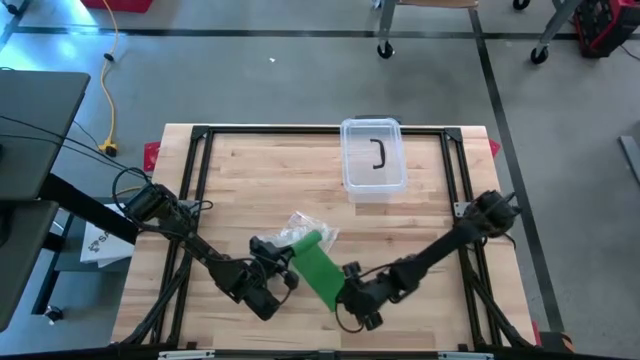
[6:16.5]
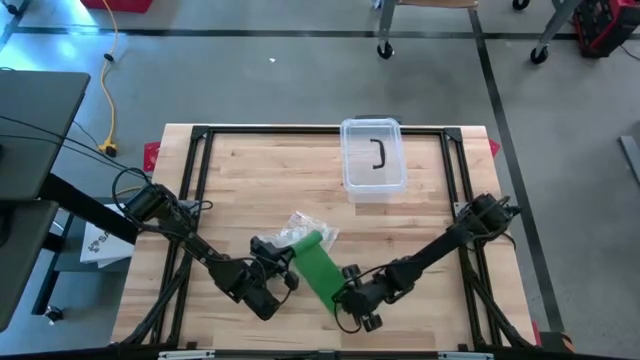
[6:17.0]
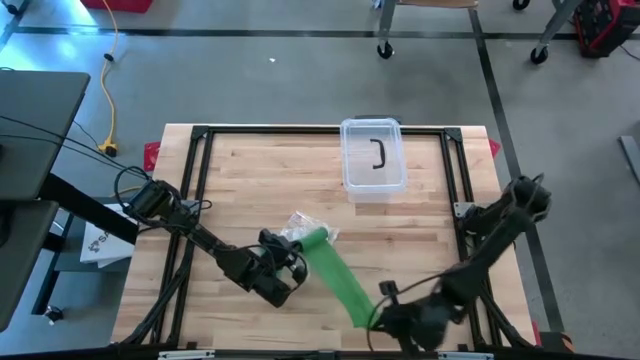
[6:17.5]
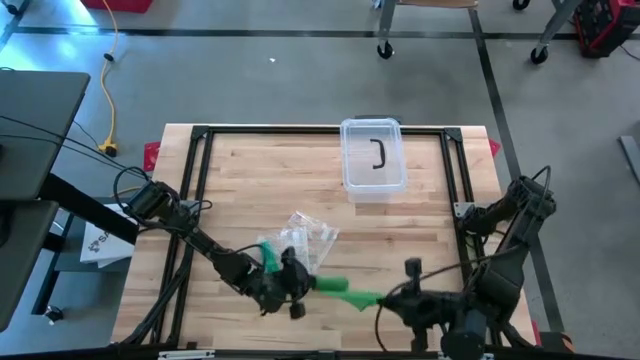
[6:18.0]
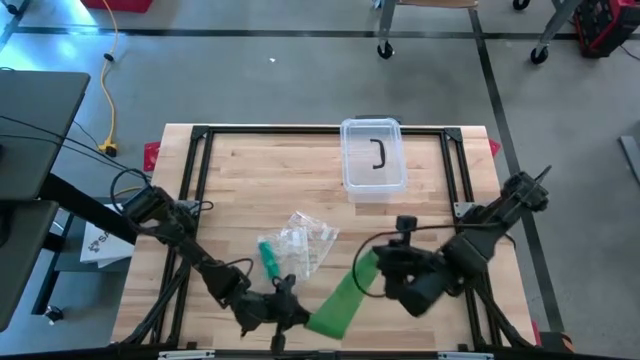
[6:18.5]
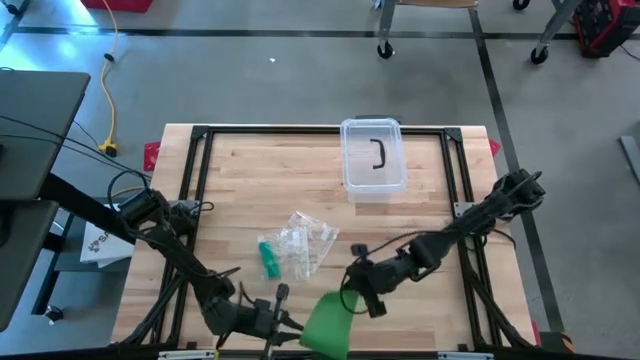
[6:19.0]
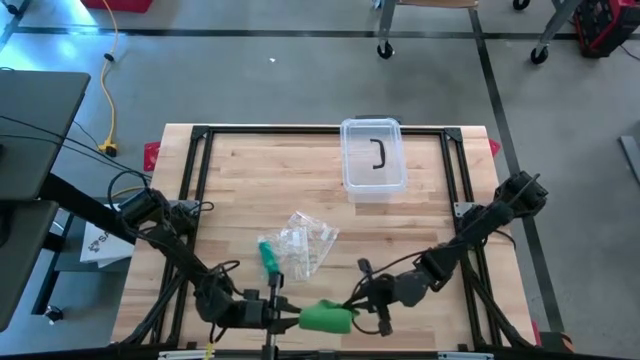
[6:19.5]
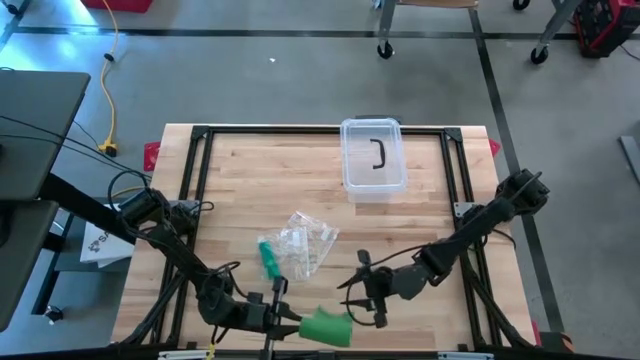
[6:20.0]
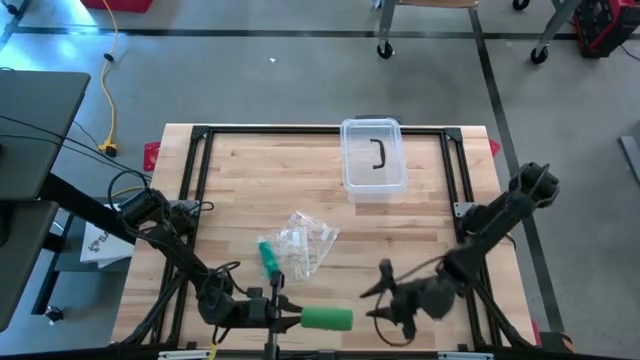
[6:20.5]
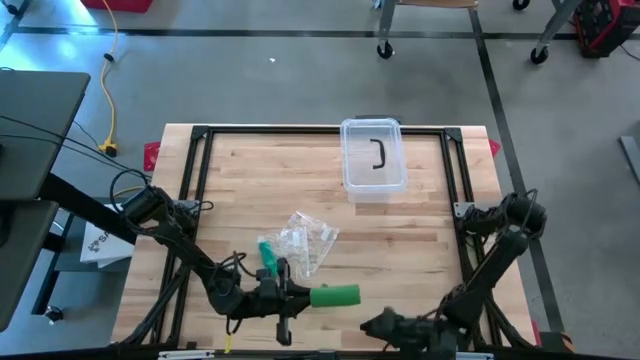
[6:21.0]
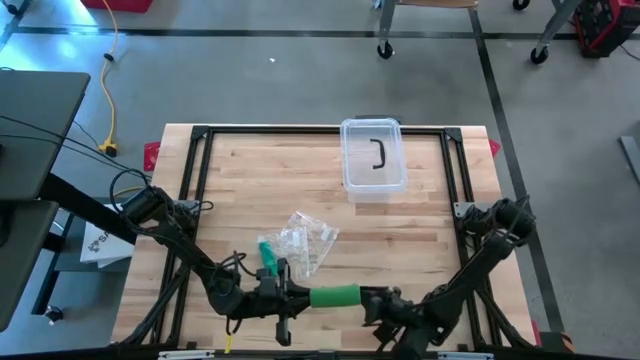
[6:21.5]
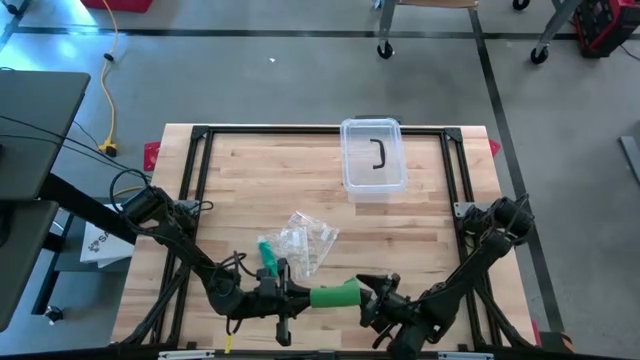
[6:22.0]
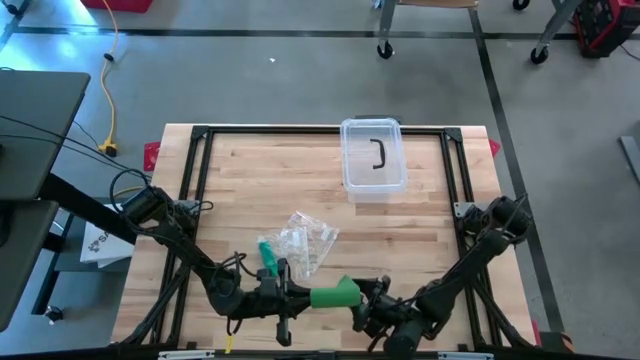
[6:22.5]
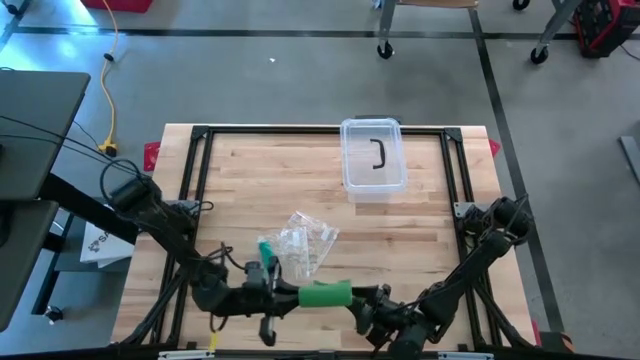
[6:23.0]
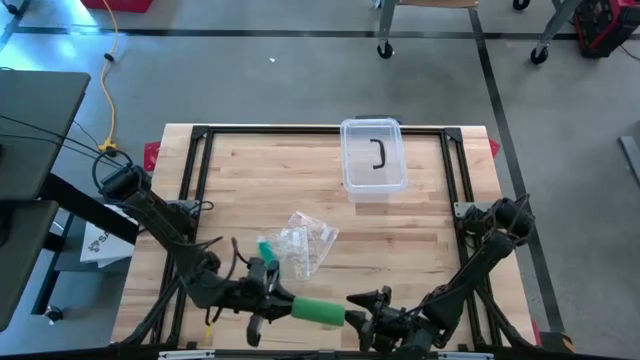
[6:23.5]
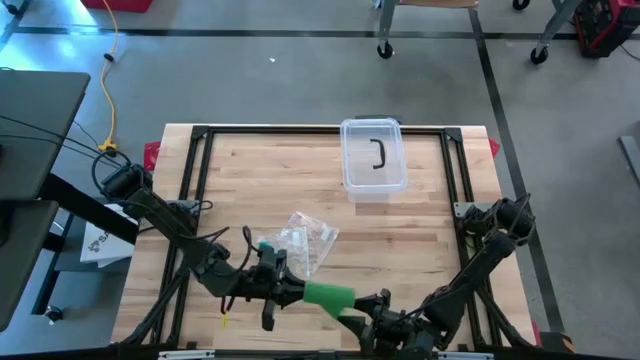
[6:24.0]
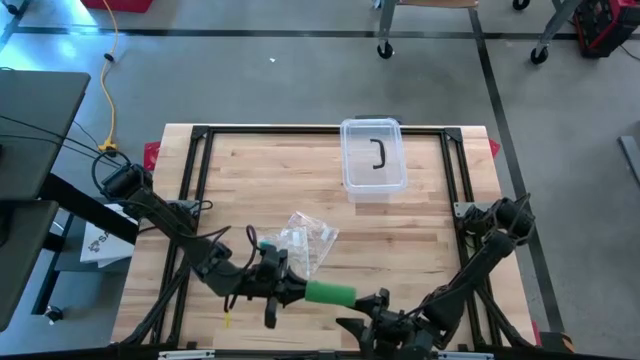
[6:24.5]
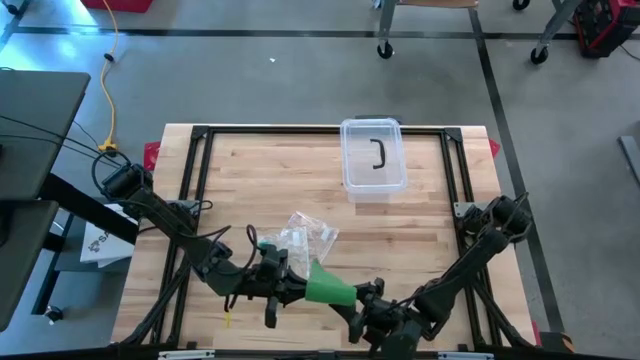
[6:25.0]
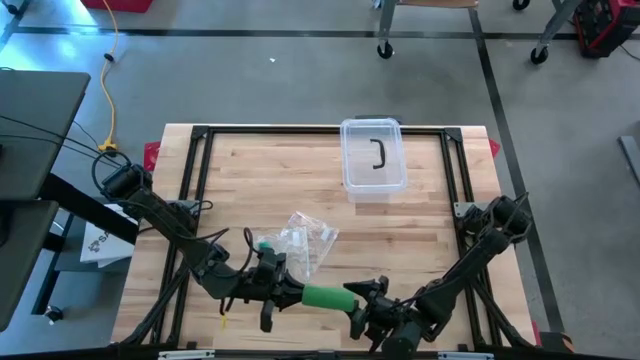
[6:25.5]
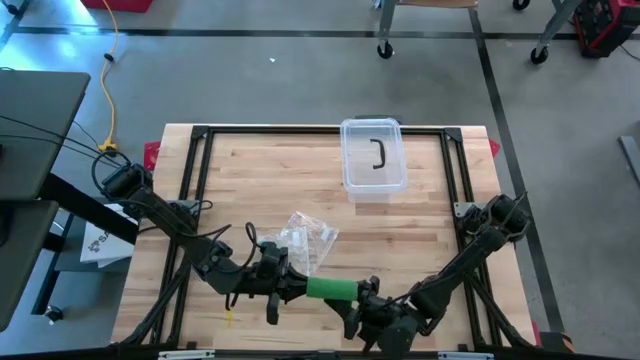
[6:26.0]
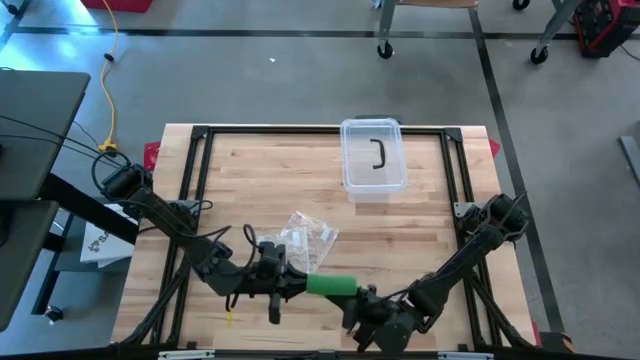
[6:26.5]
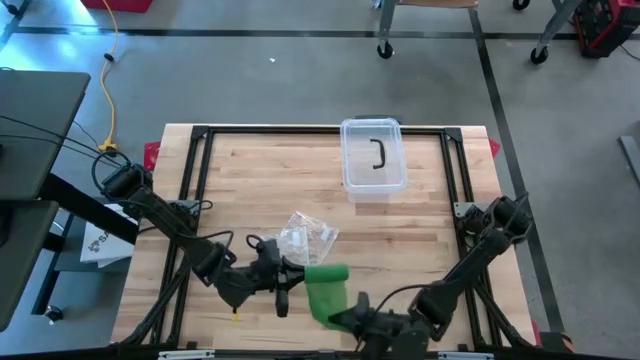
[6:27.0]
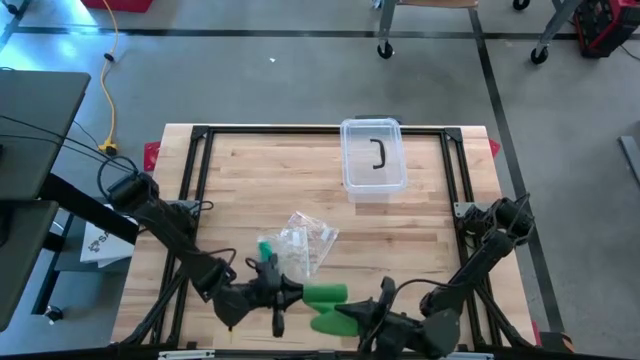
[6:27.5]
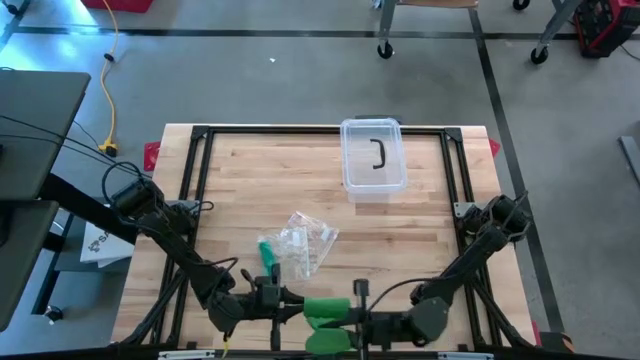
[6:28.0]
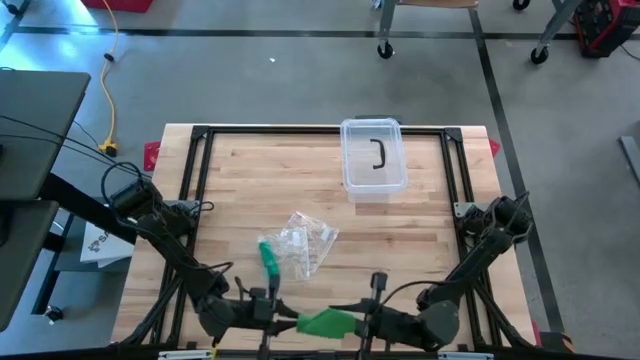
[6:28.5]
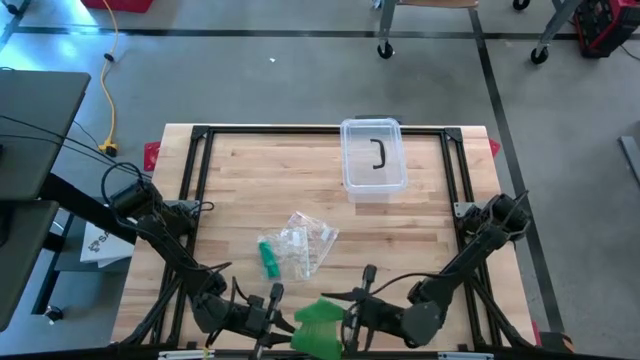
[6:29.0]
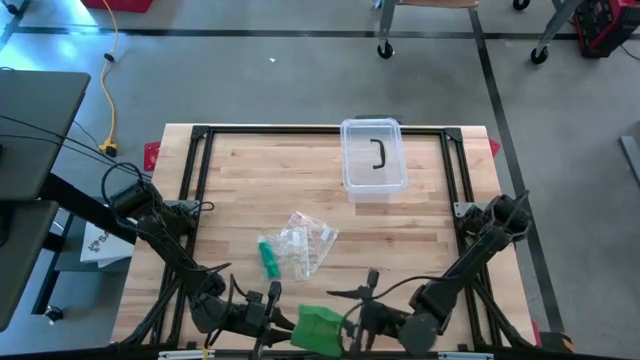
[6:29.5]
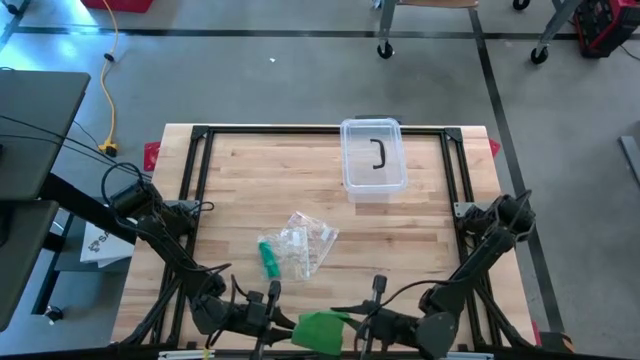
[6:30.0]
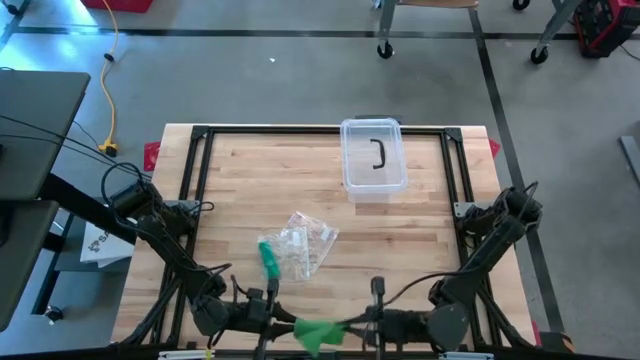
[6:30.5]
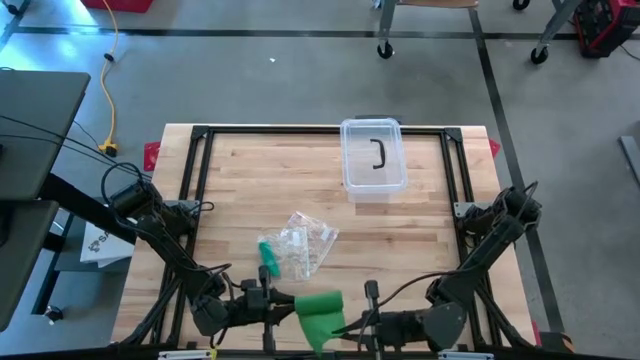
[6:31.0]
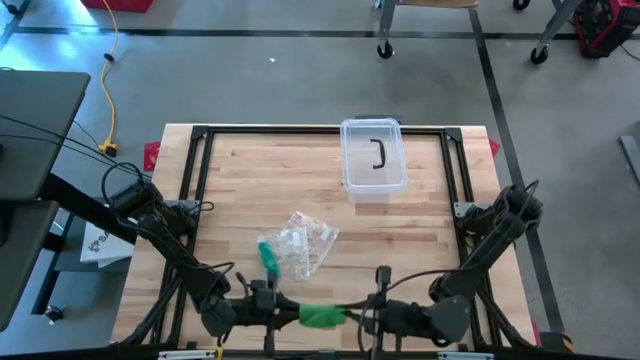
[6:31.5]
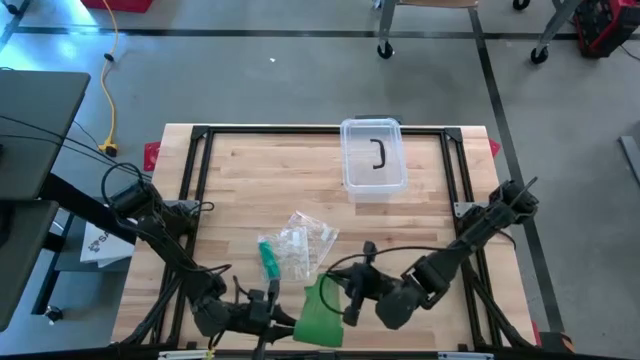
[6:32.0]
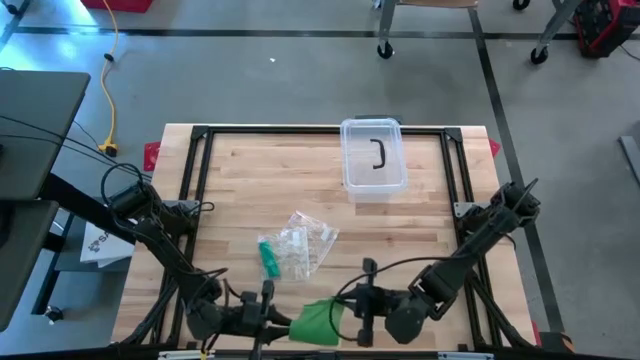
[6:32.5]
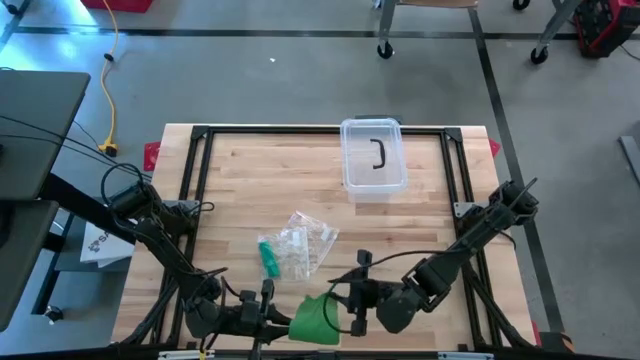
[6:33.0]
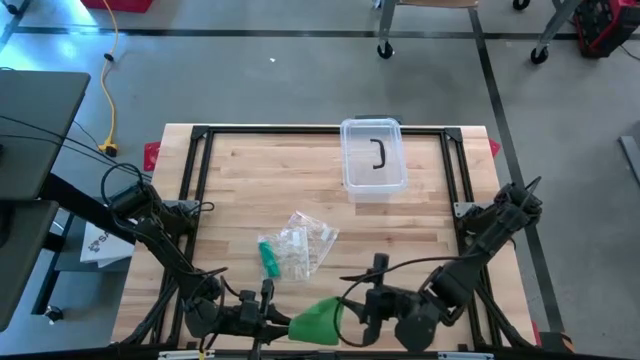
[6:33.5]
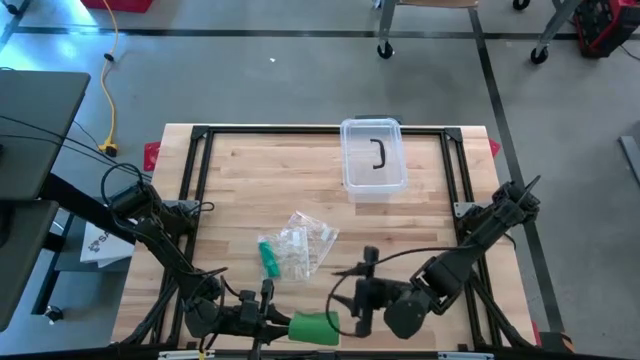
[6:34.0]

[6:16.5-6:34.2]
Task: Roll bandage
Roll the green bandage
